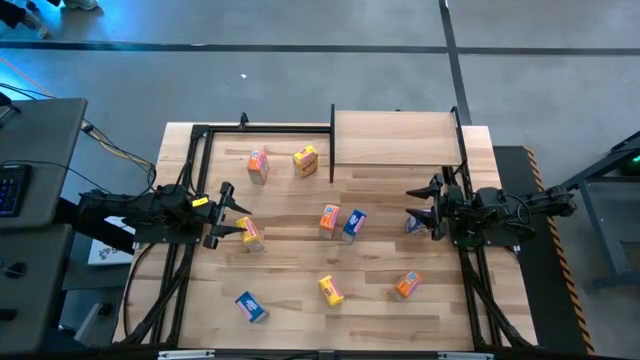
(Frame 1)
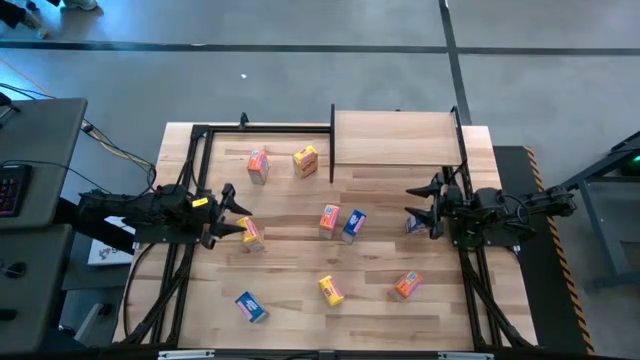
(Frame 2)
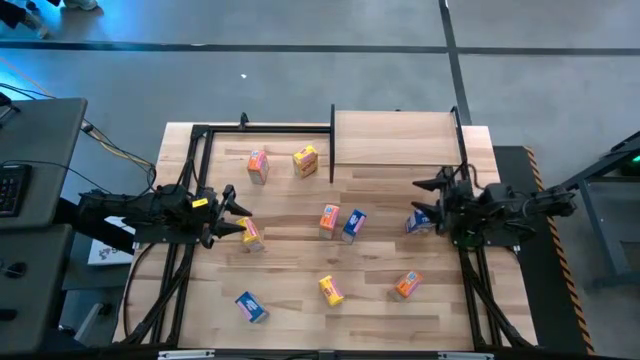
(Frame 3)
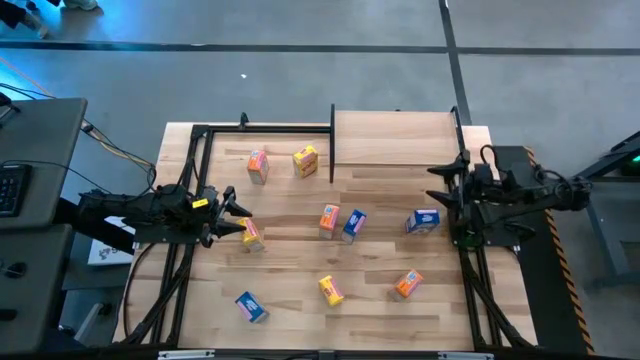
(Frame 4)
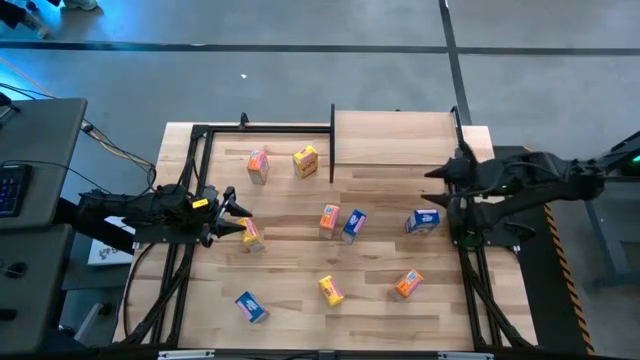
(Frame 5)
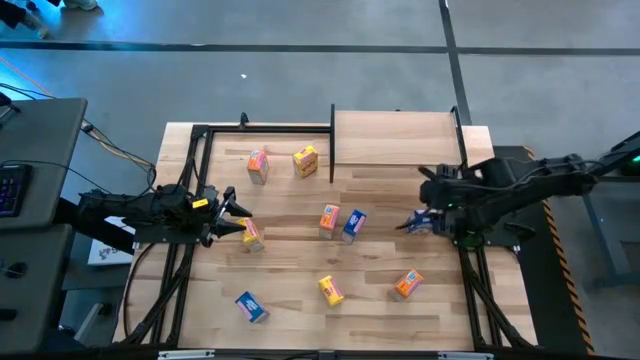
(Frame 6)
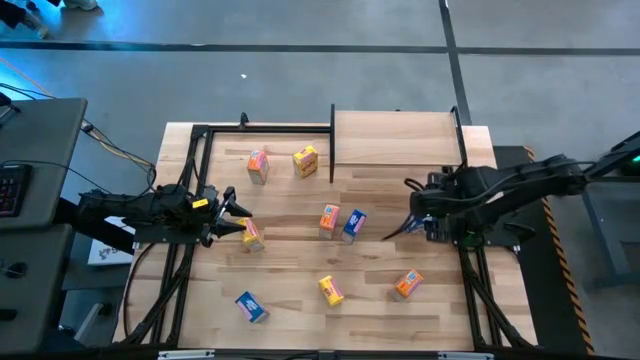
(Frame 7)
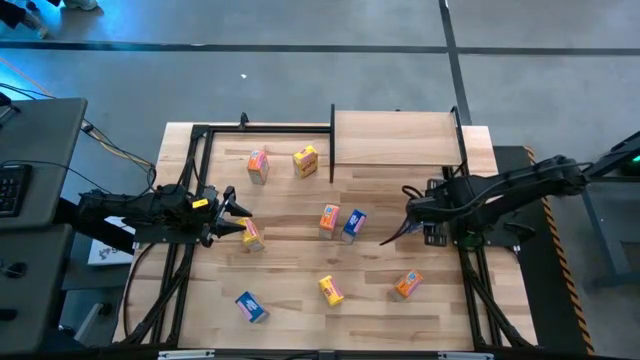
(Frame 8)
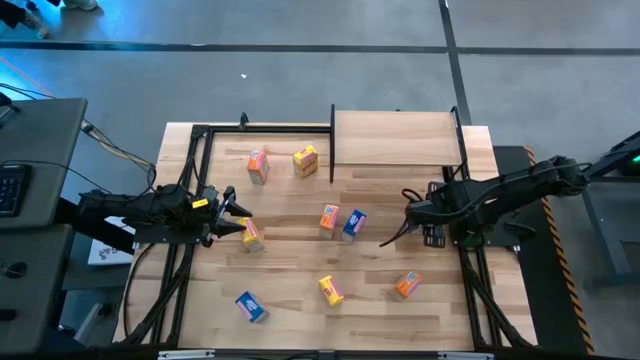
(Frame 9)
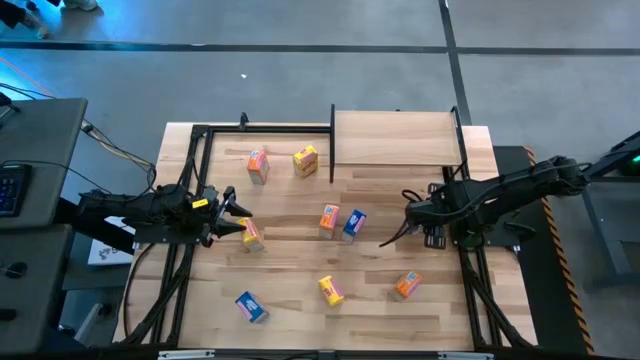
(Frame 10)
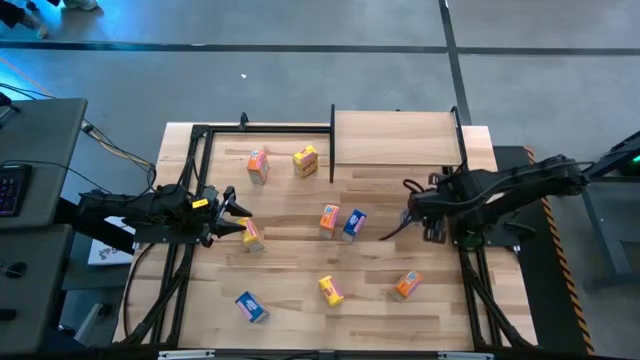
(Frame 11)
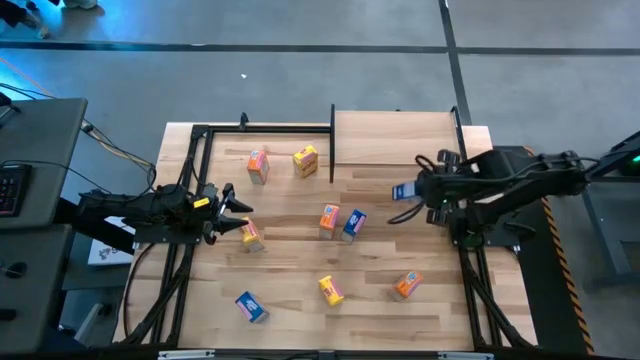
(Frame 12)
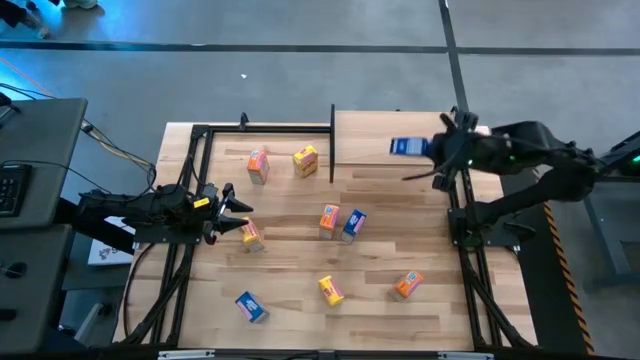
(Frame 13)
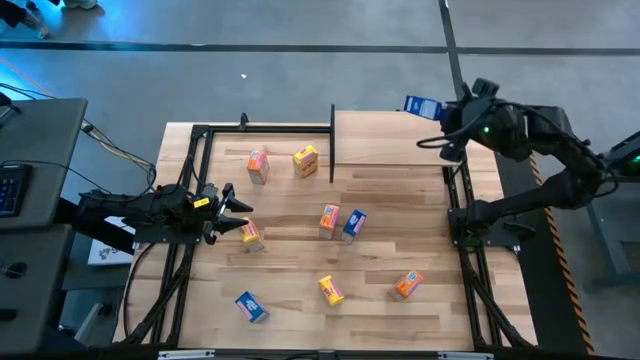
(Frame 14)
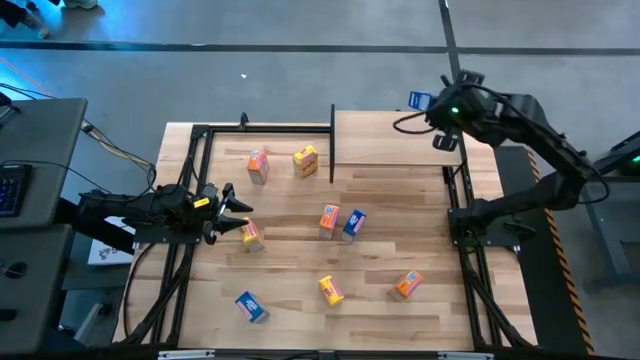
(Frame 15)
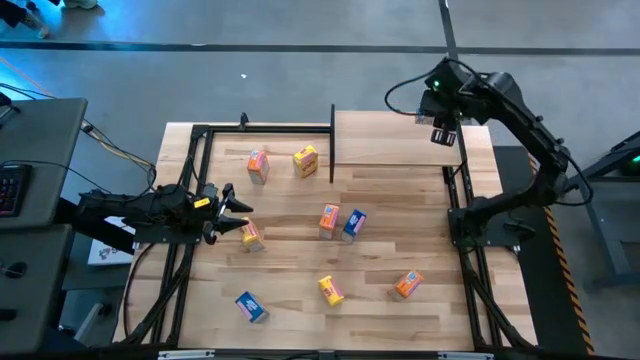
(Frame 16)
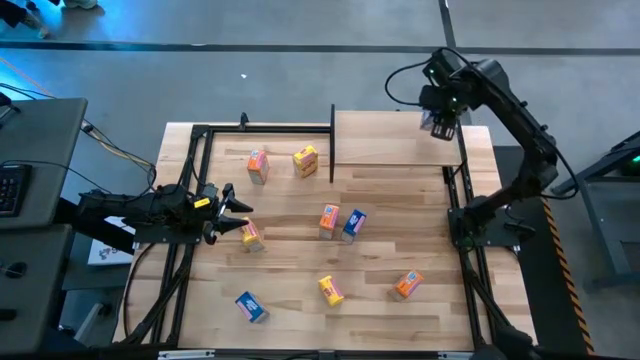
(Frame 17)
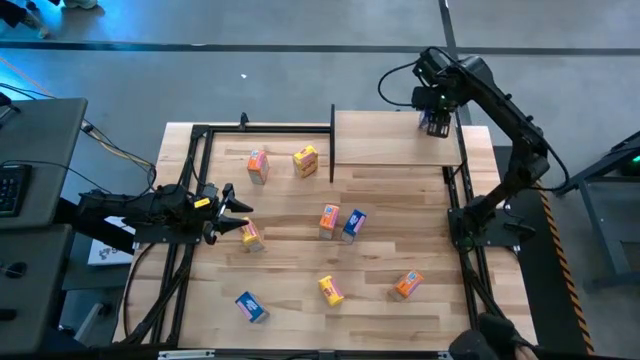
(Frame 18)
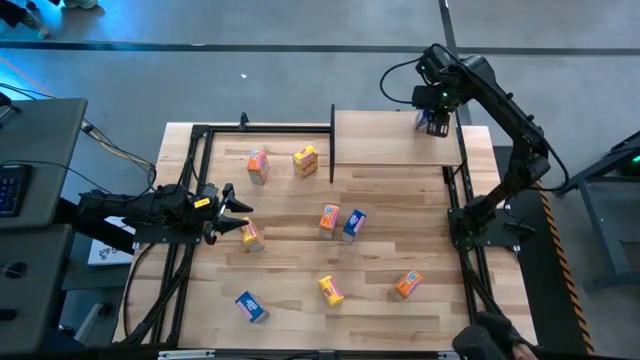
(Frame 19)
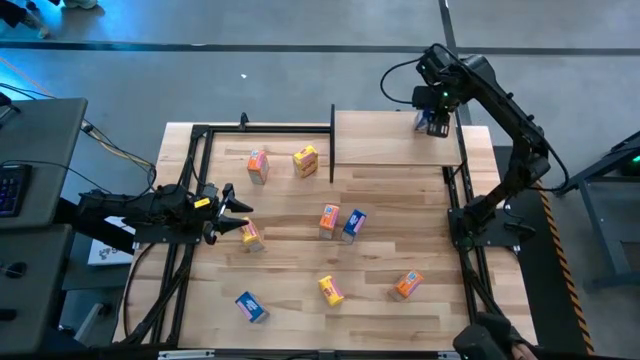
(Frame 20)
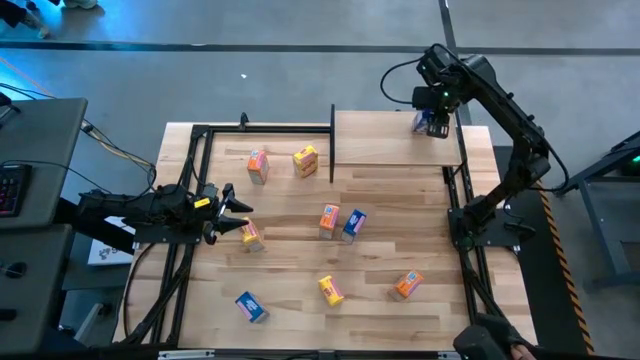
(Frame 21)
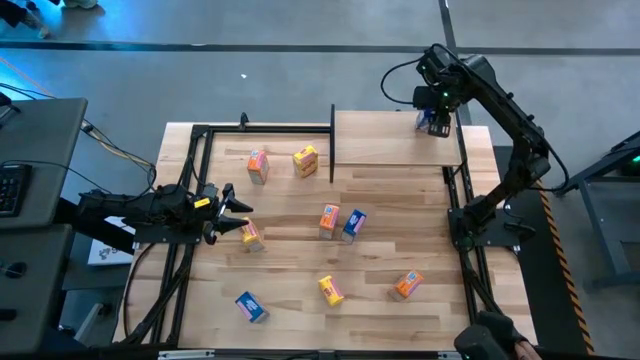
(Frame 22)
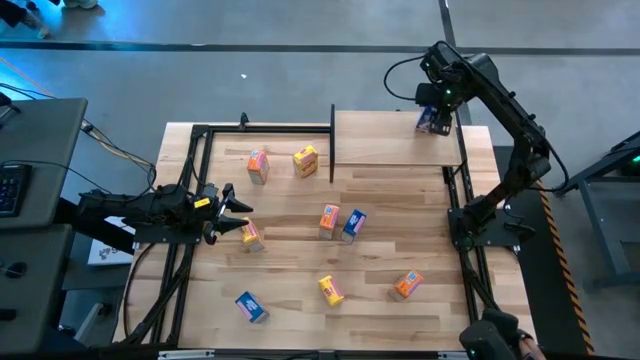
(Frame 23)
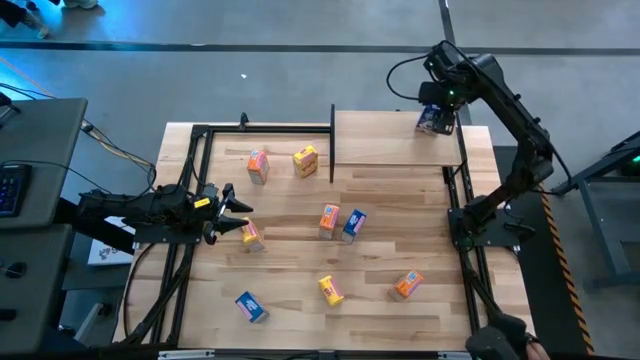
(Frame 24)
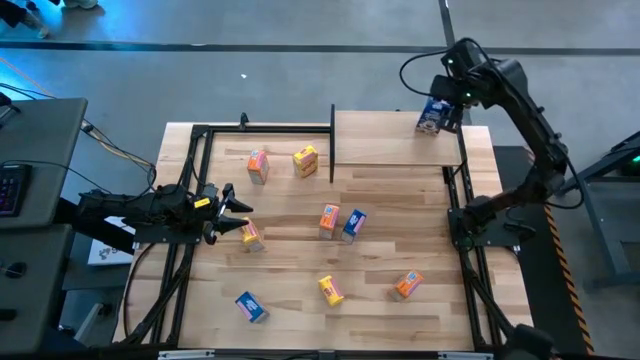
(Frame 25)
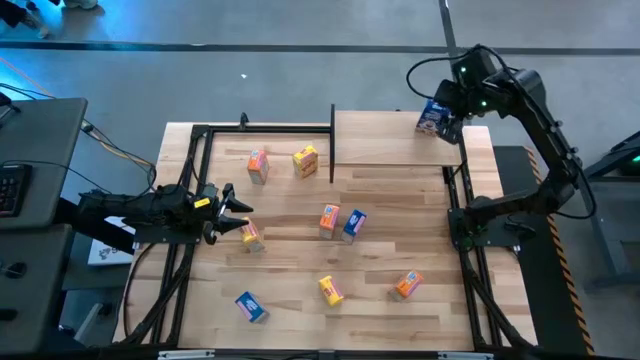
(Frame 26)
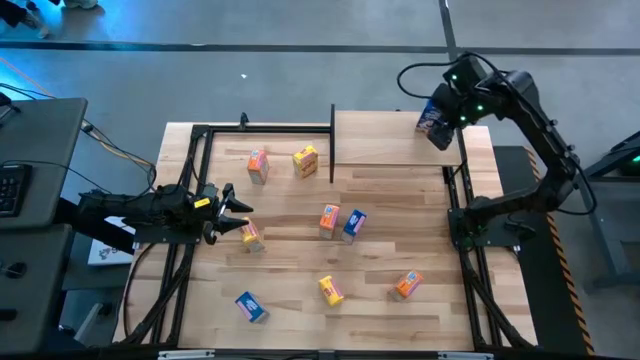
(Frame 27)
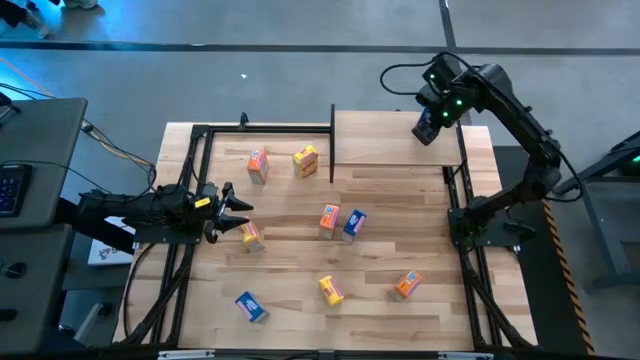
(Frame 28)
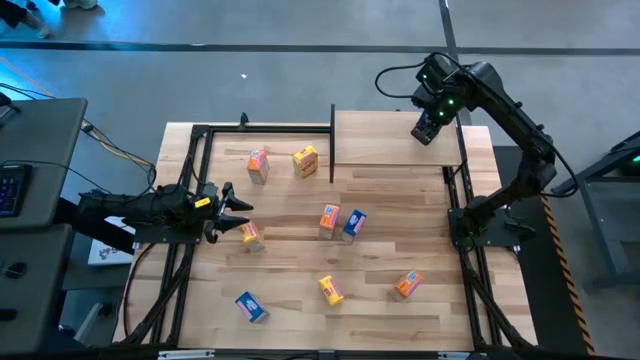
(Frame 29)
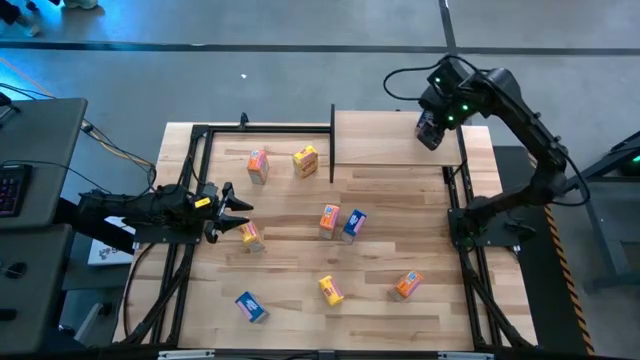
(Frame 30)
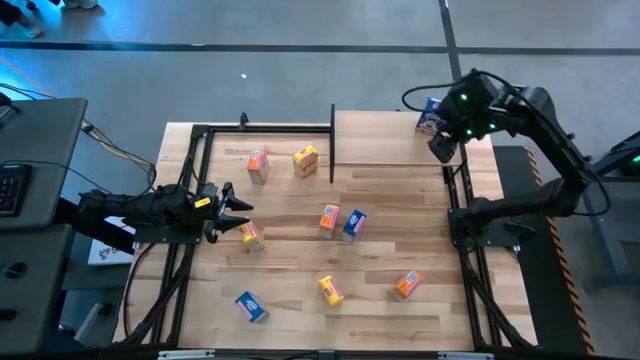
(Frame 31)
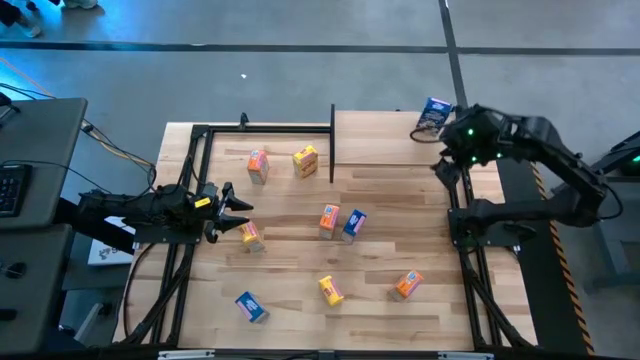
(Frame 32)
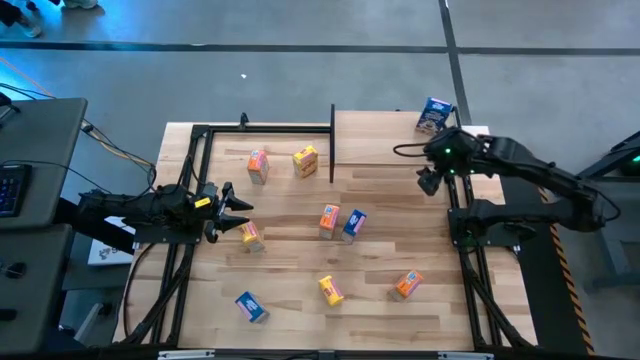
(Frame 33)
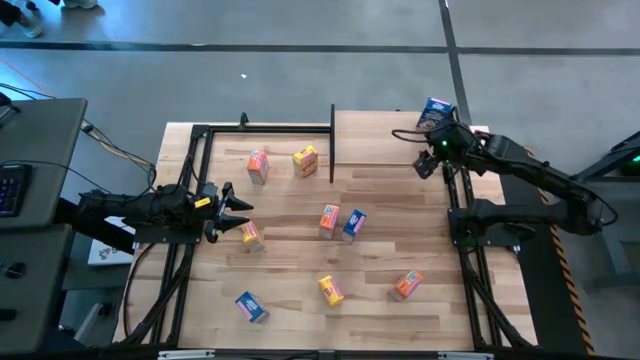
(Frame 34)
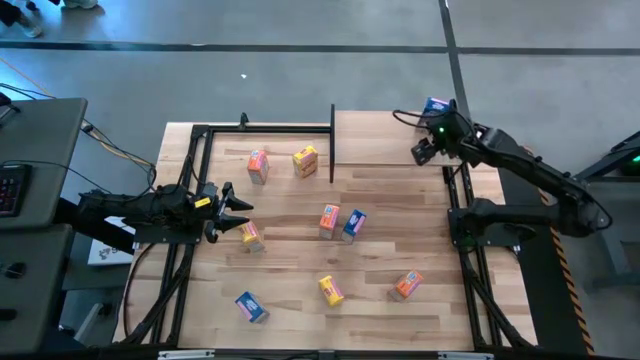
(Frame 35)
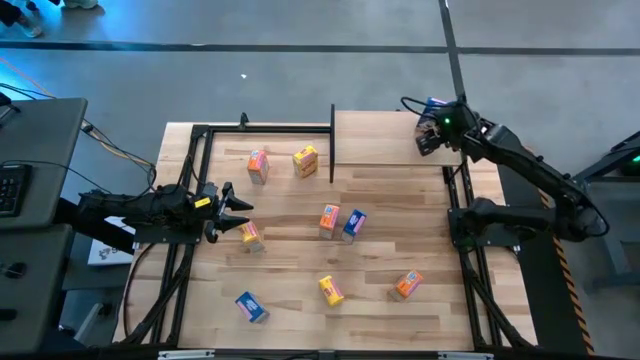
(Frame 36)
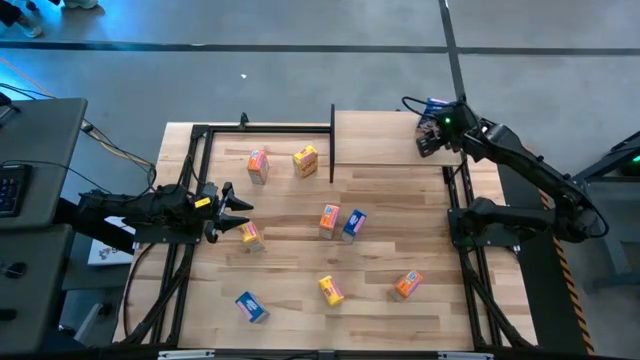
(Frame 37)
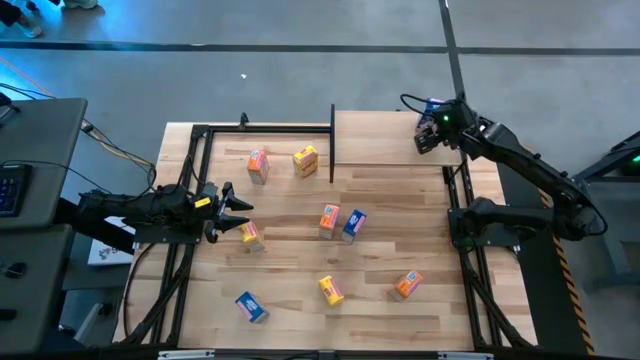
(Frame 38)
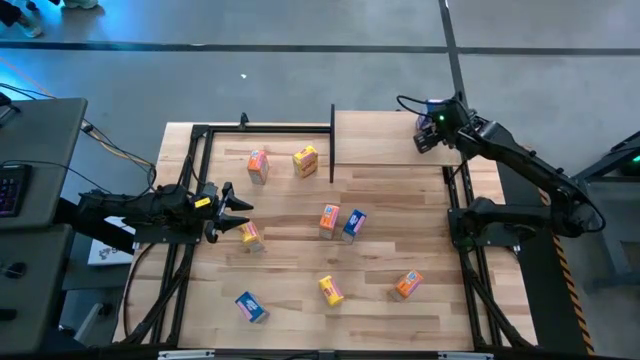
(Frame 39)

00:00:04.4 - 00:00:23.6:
Task: Stack cereal on shelf
Put the top right blue cereal box on the shelf
